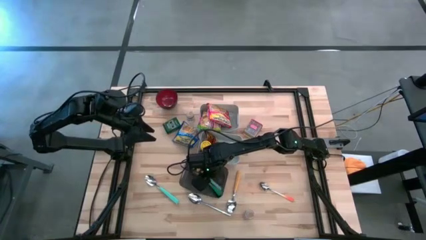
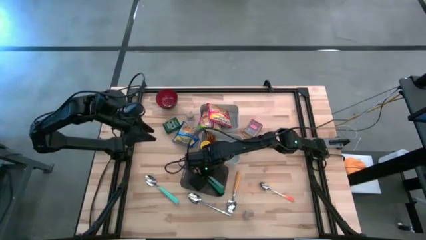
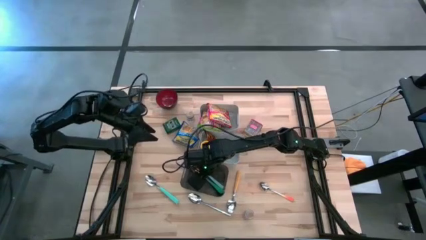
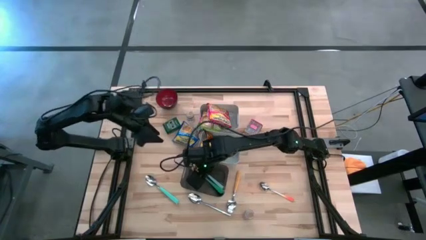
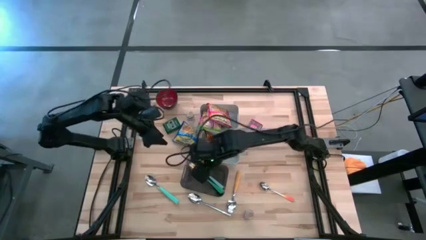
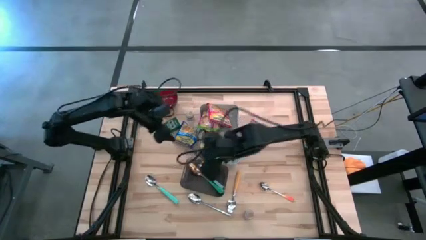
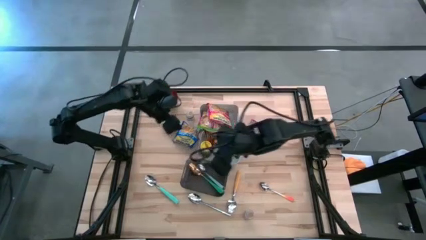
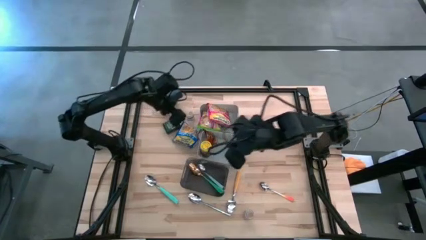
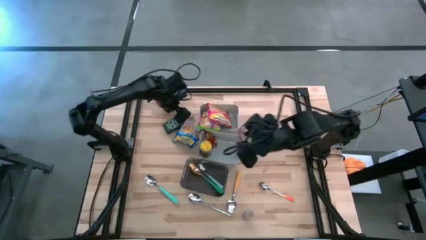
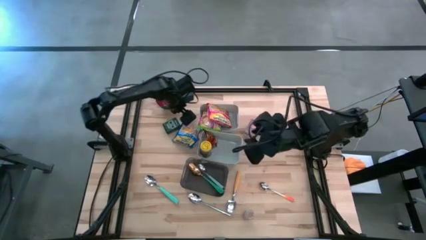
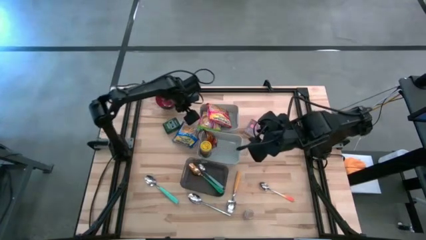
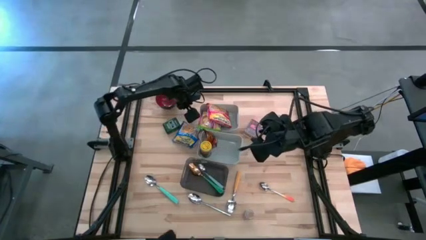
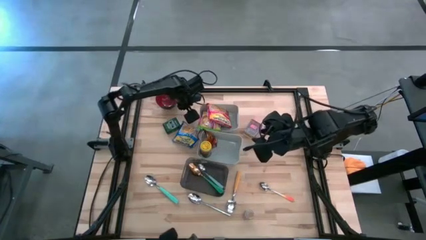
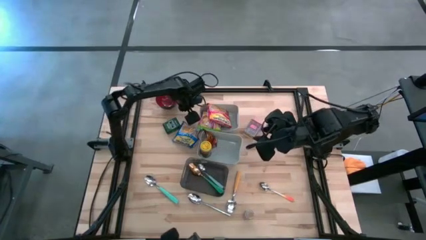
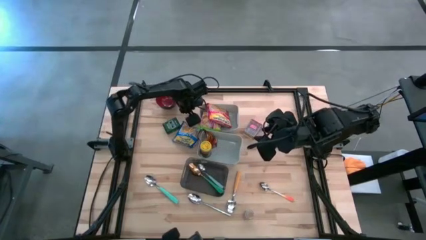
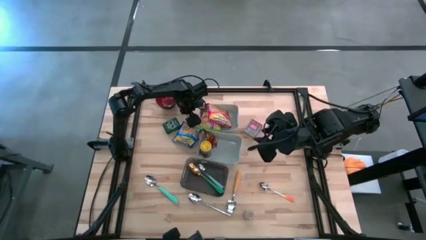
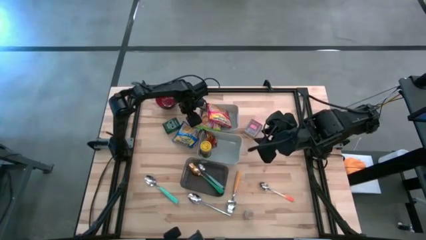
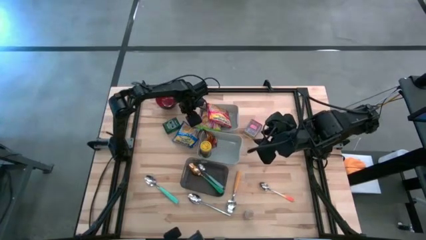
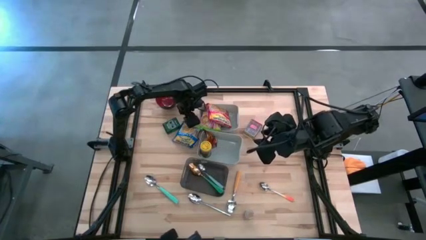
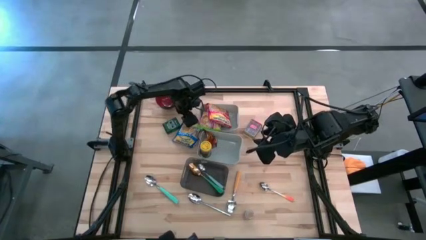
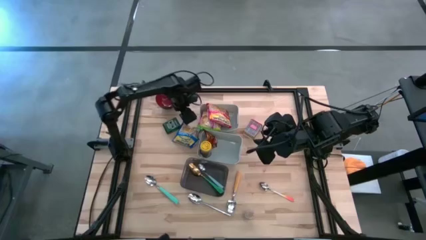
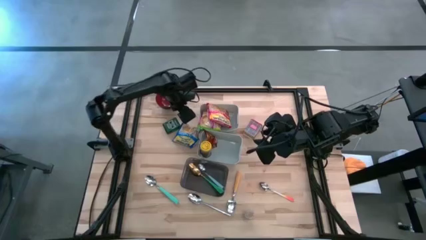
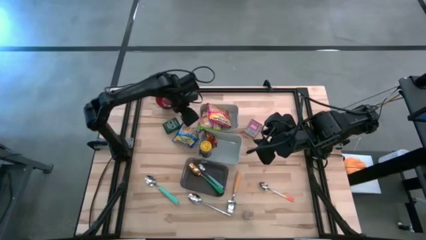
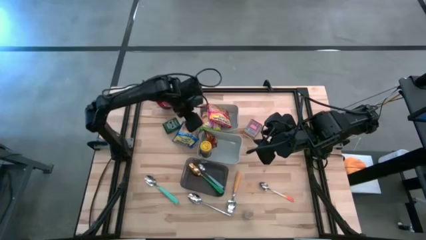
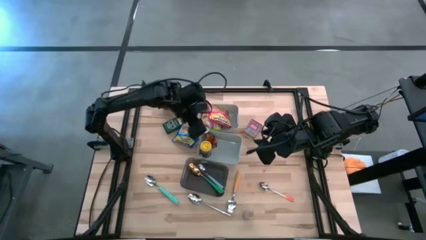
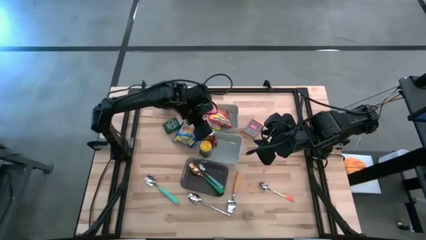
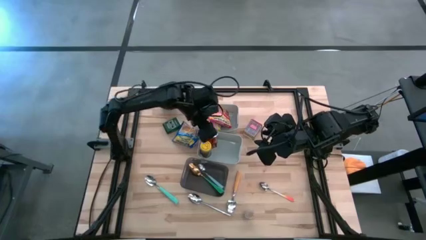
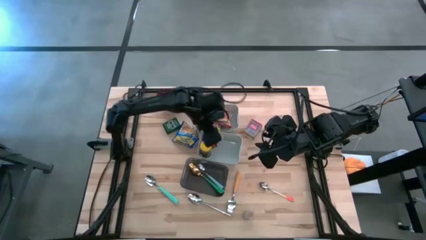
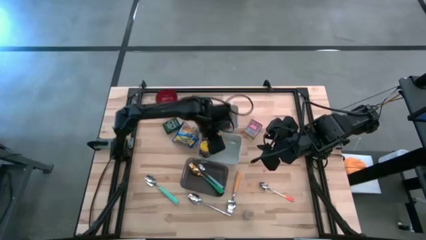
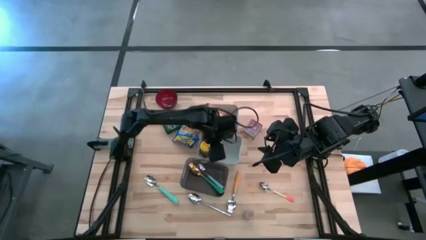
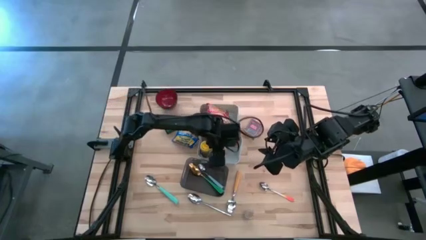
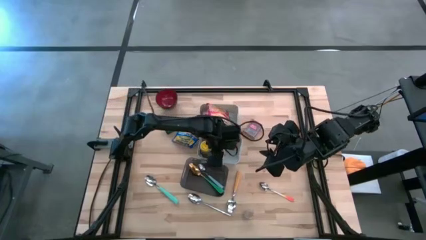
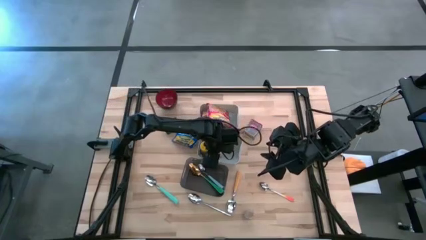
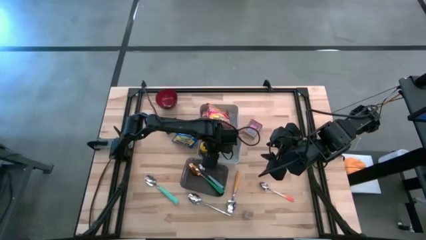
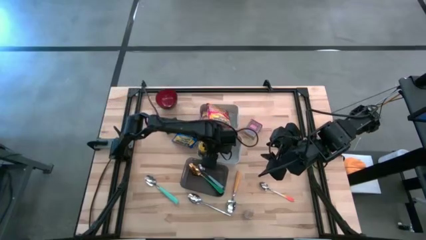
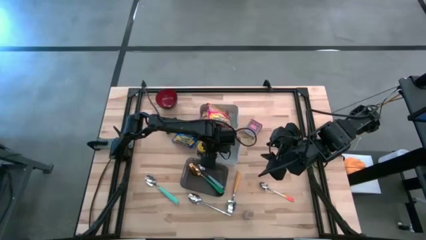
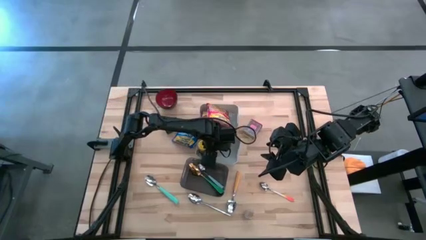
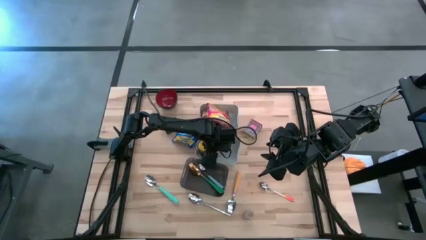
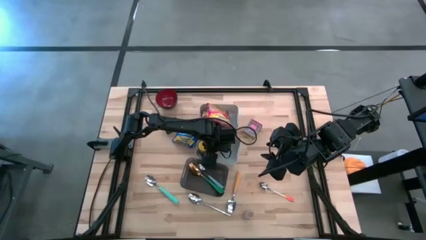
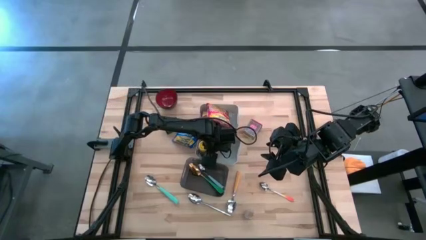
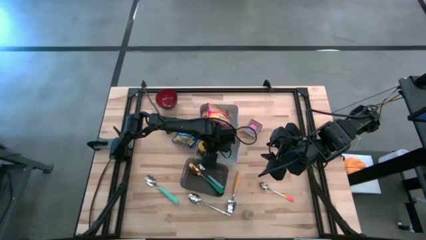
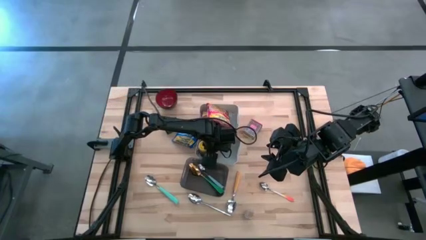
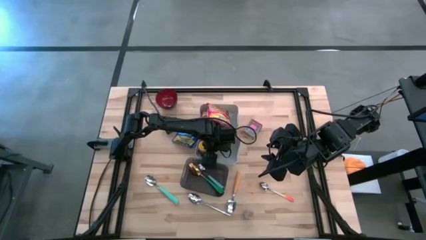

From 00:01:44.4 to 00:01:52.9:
Put the top brown seasoning bottle into the bottom gray bin
